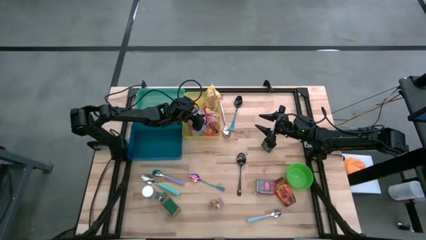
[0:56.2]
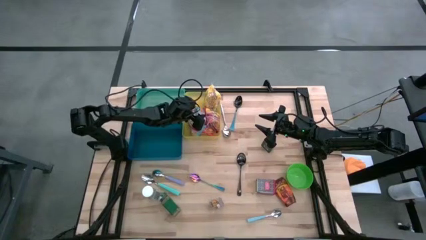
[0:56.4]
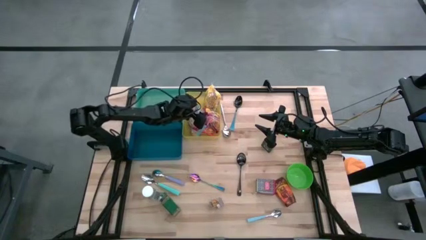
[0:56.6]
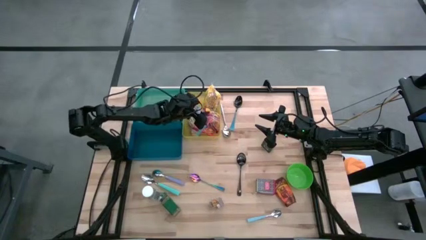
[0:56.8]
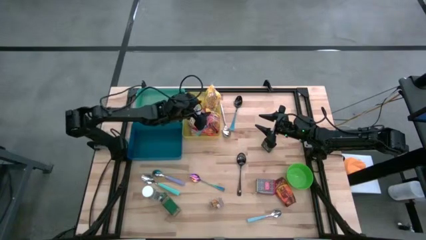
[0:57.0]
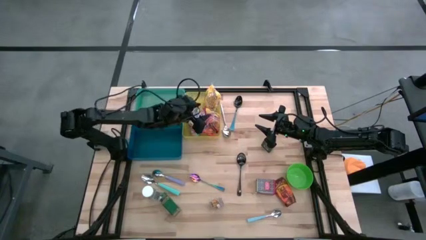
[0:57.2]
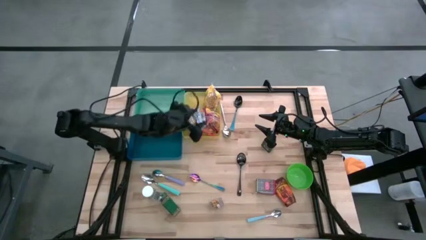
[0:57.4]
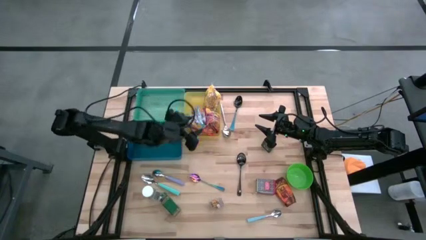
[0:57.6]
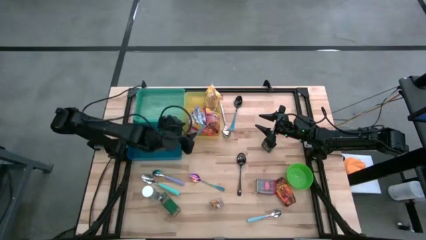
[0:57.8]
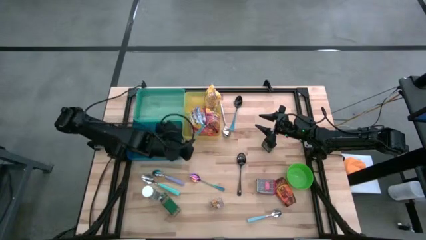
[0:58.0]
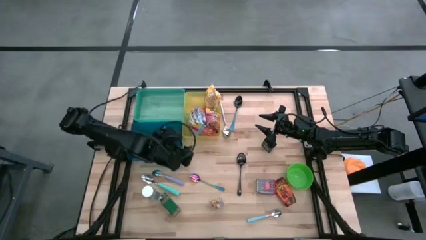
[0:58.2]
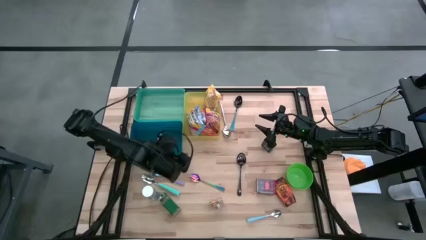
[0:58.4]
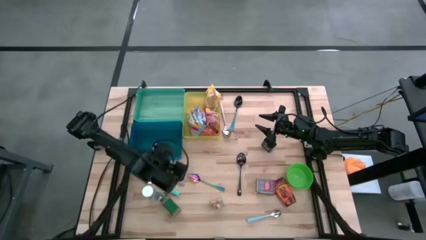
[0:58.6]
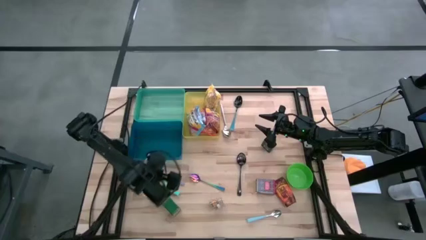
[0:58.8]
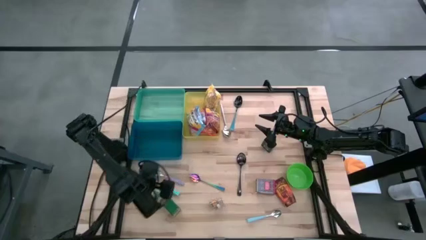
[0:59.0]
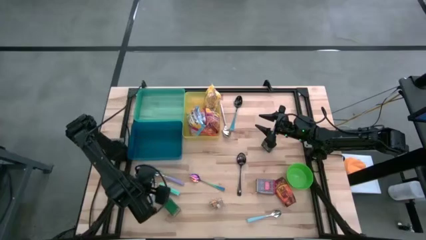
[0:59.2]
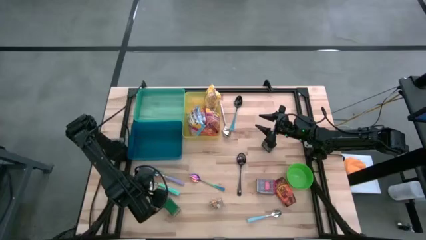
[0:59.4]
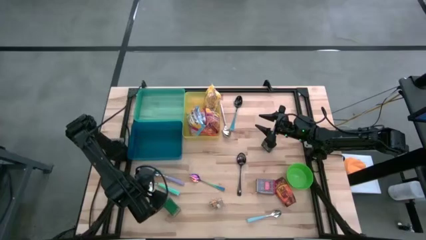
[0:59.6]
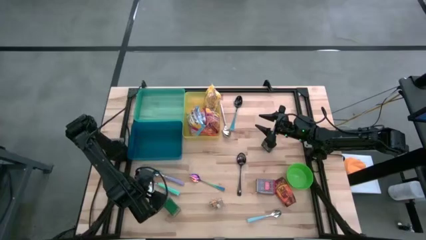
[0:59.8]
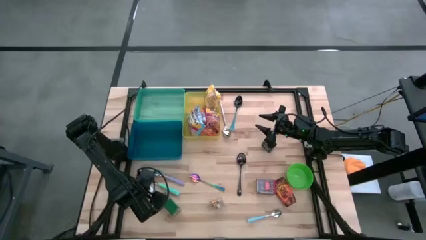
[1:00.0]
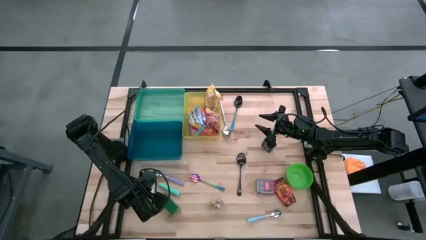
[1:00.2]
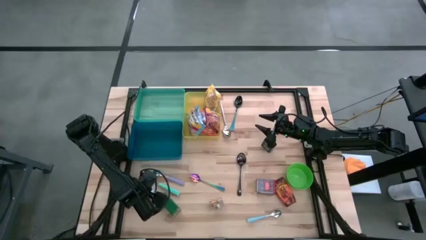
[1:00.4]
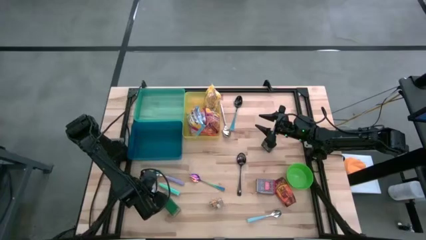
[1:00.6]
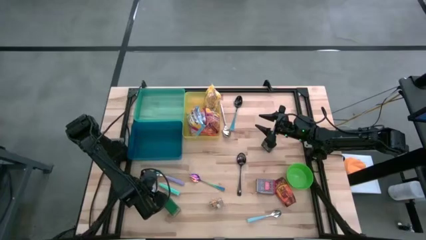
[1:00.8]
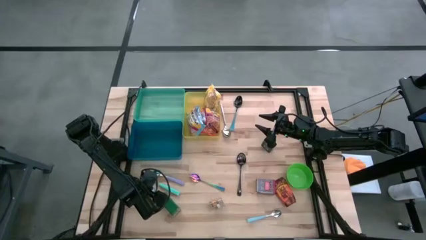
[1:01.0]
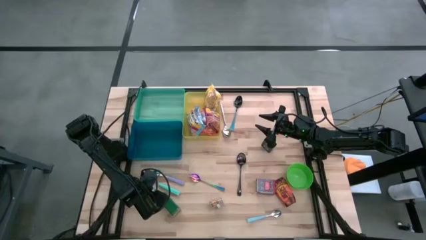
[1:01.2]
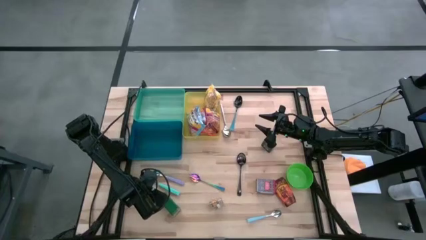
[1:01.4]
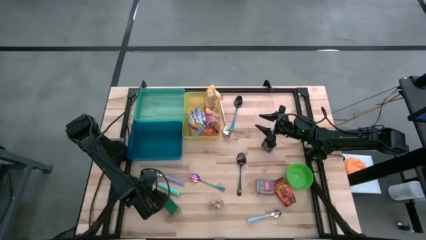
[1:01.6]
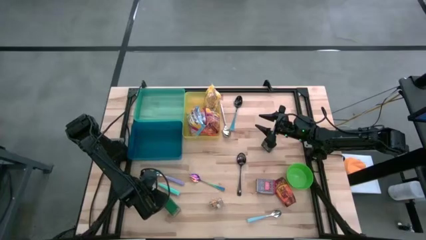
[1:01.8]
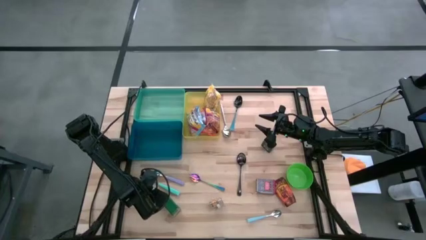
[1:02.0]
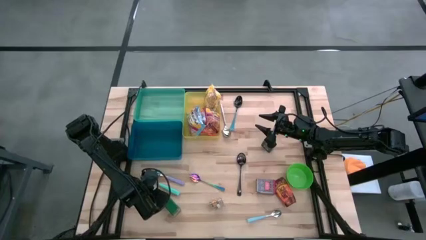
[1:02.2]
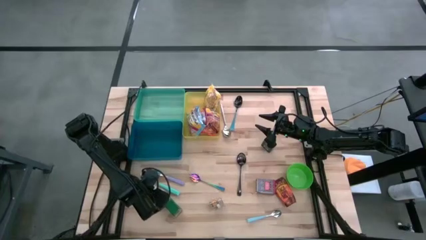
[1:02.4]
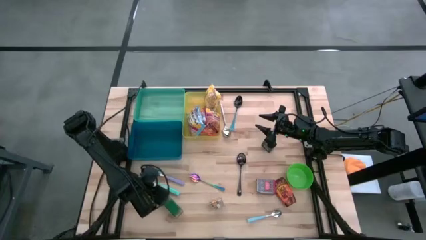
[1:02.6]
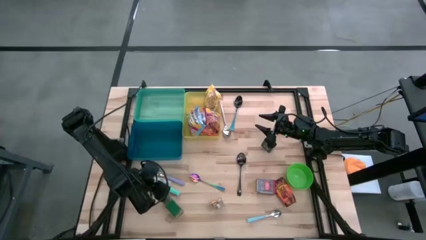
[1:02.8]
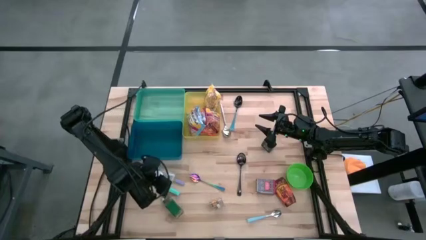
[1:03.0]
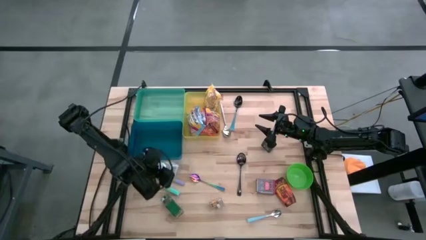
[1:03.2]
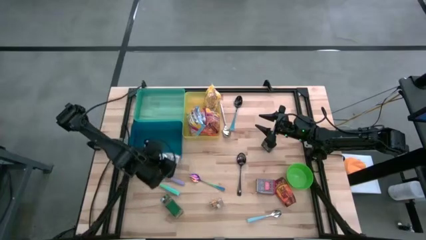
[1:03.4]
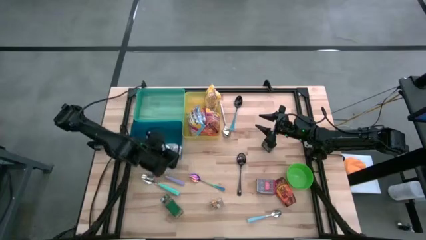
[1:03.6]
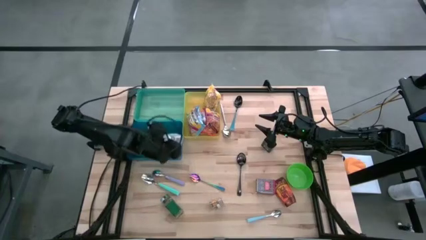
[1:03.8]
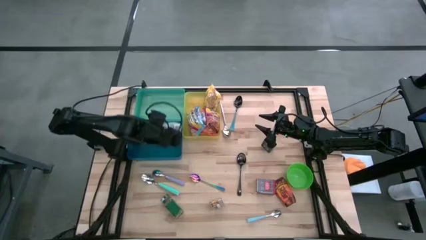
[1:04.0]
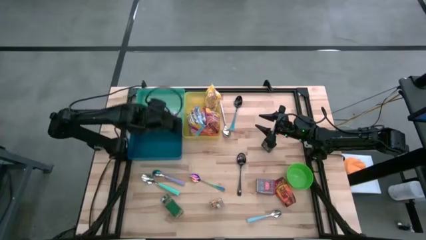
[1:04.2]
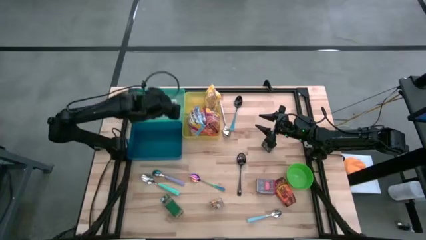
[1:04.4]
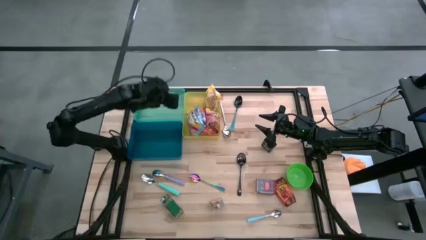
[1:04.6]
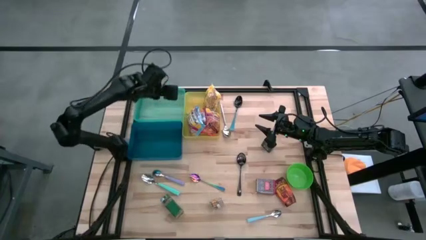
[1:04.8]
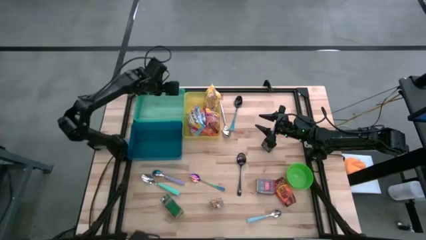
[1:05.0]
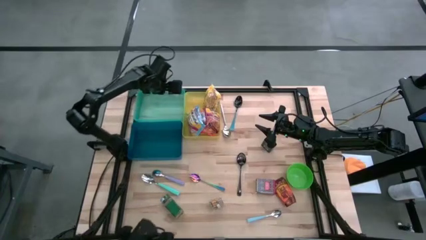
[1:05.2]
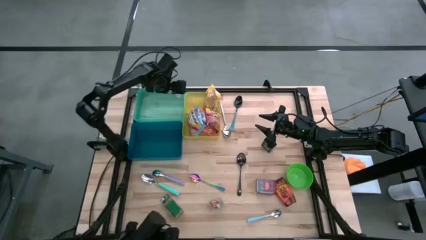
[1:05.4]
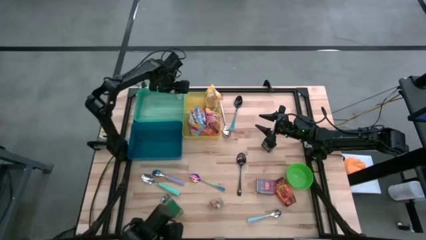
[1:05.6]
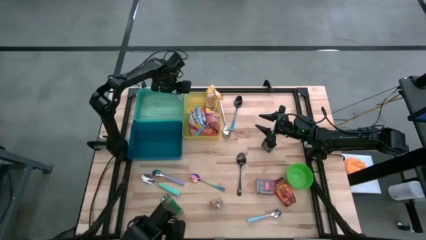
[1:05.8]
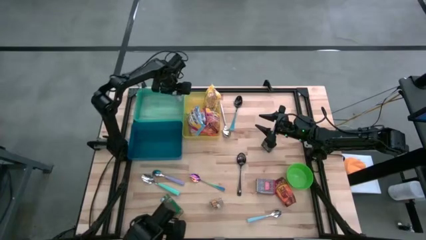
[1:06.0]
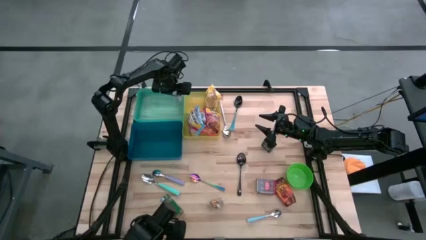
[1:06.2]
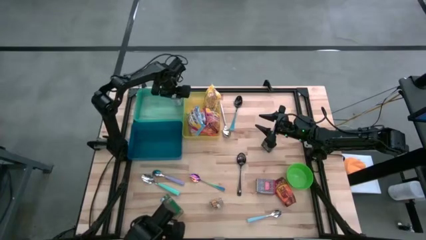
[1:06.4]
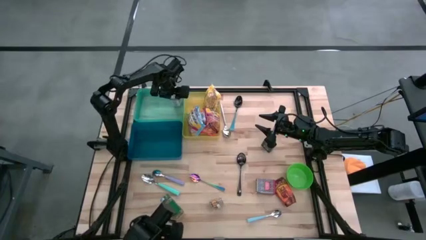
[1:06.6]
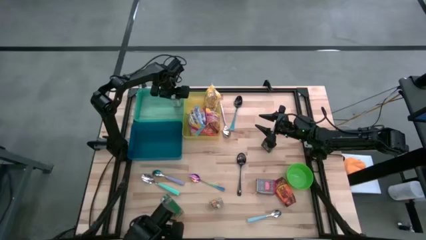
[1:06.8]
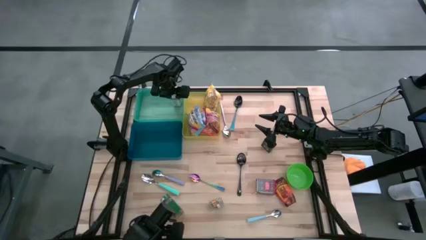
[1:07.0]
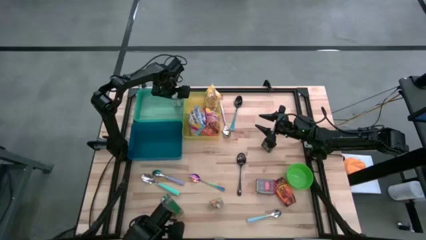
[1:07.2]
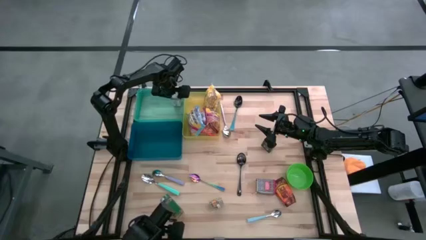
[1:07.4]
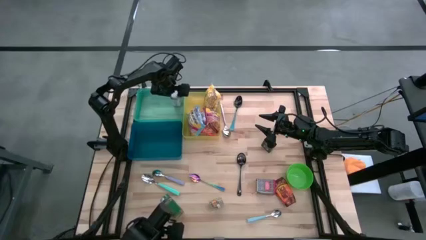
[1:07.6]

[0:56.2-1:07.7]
Put the white spice bottle into the green bin
